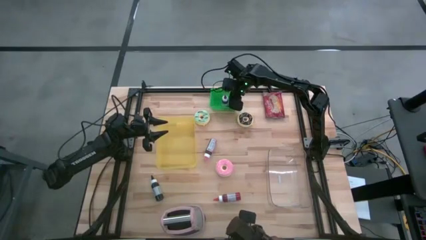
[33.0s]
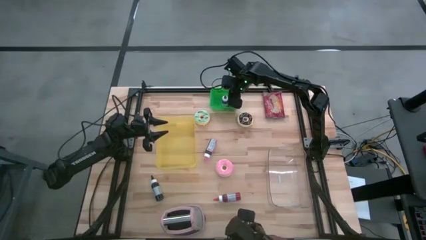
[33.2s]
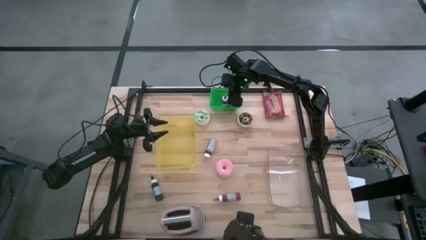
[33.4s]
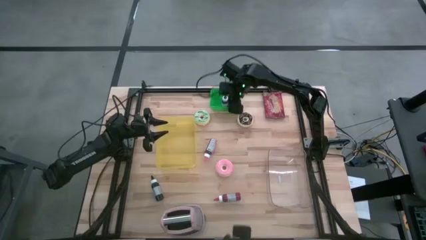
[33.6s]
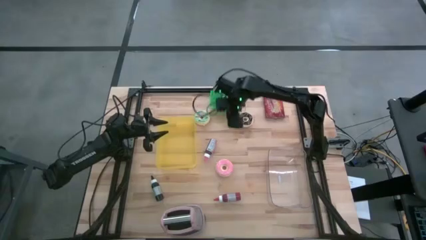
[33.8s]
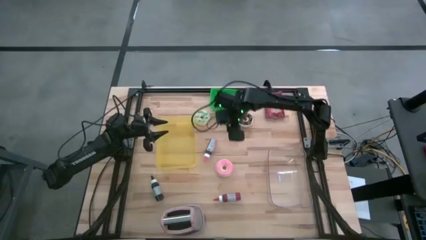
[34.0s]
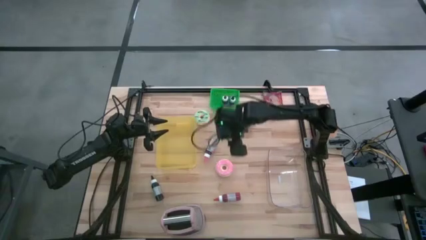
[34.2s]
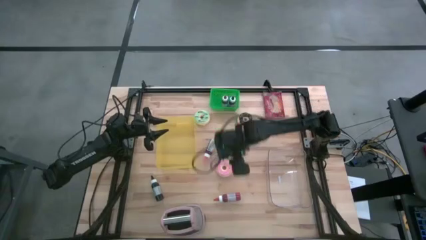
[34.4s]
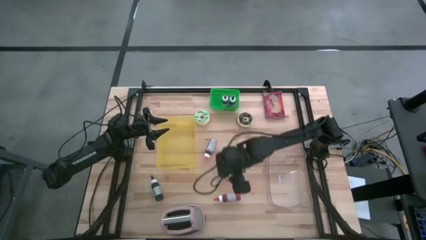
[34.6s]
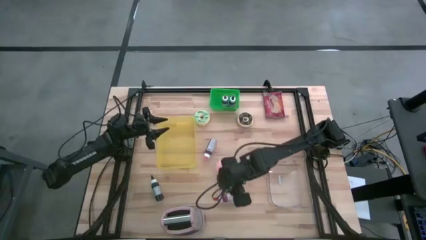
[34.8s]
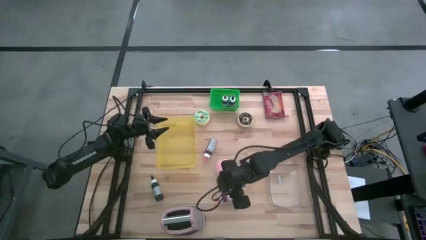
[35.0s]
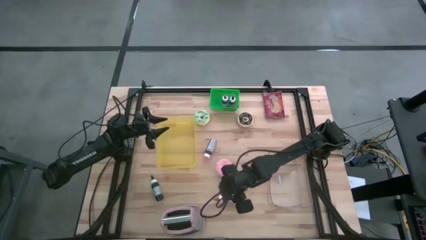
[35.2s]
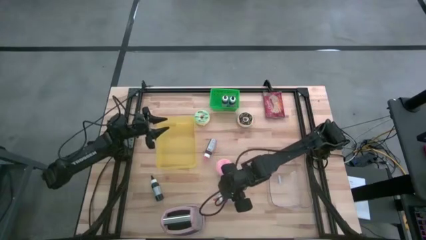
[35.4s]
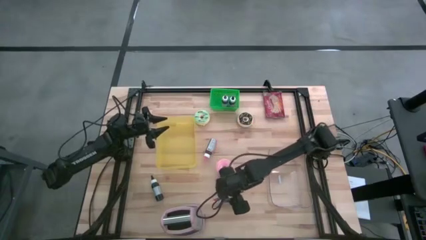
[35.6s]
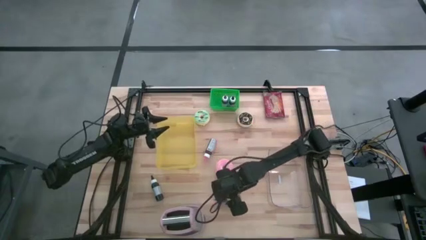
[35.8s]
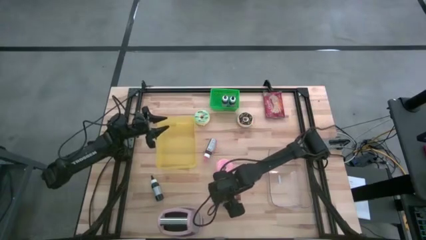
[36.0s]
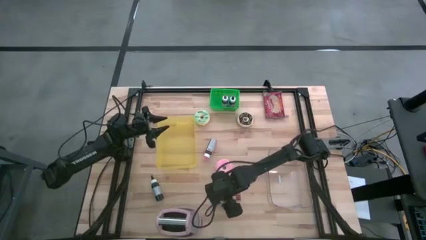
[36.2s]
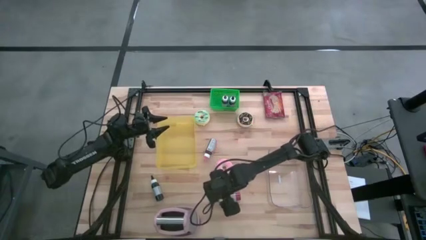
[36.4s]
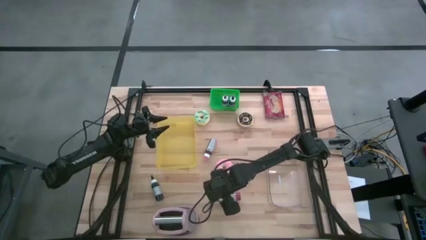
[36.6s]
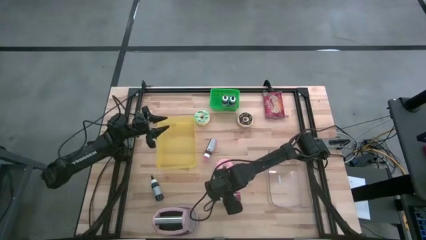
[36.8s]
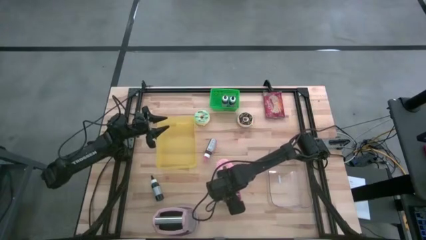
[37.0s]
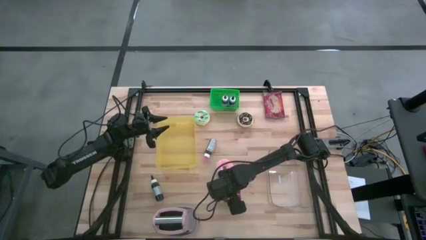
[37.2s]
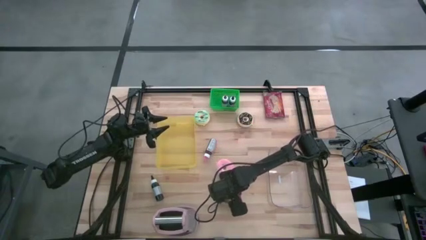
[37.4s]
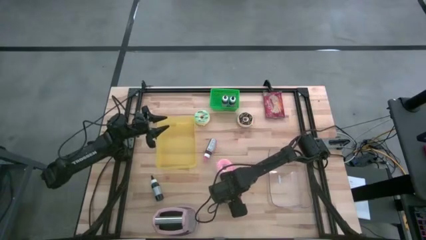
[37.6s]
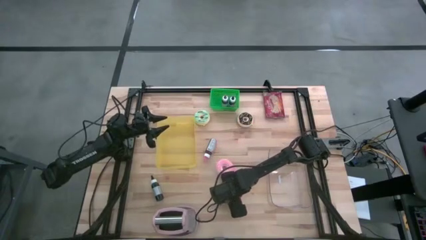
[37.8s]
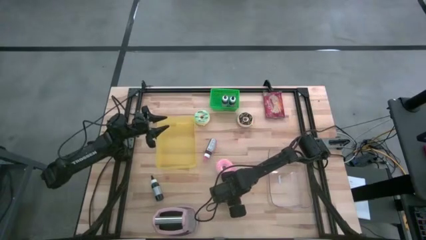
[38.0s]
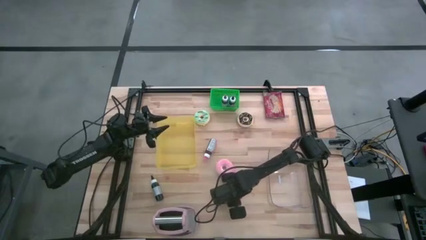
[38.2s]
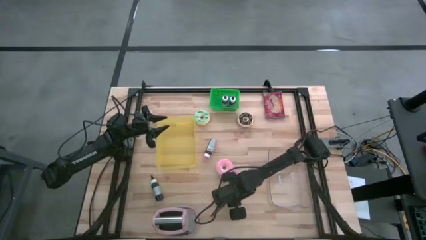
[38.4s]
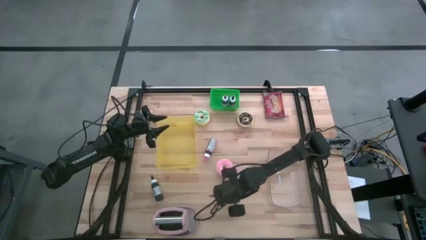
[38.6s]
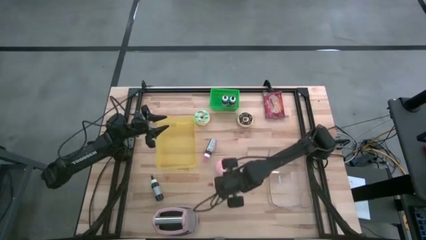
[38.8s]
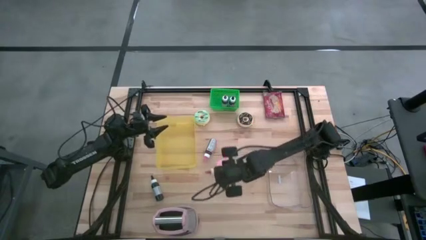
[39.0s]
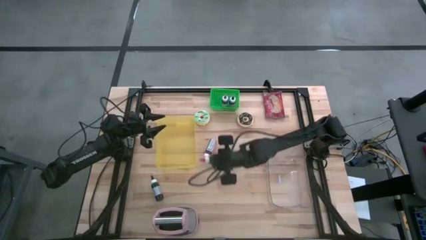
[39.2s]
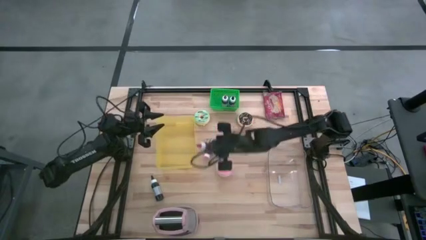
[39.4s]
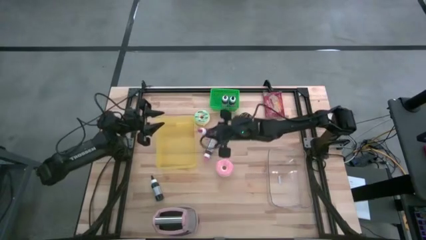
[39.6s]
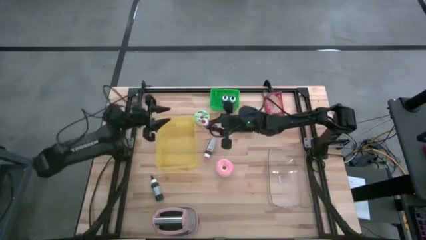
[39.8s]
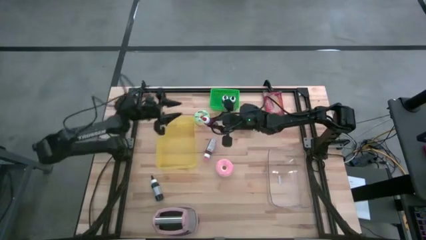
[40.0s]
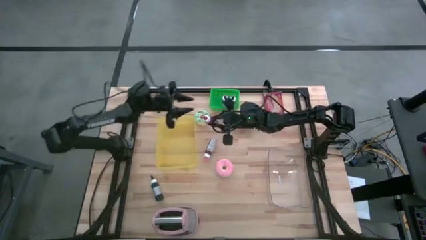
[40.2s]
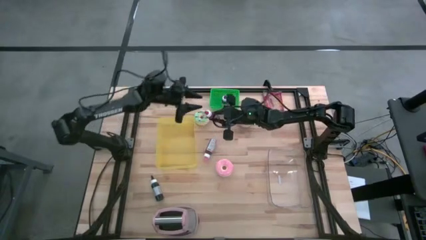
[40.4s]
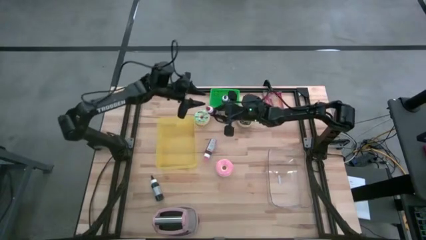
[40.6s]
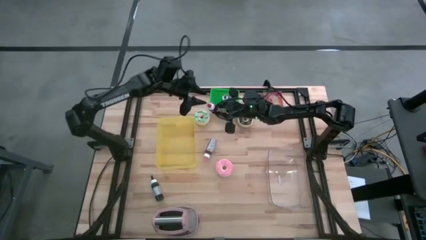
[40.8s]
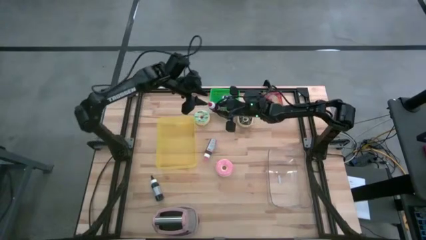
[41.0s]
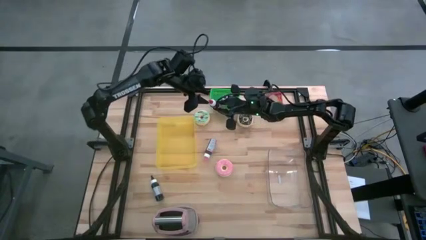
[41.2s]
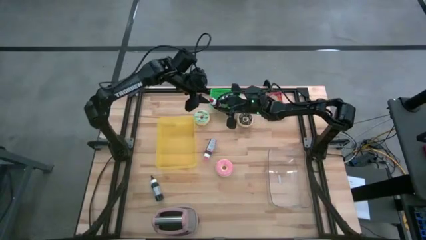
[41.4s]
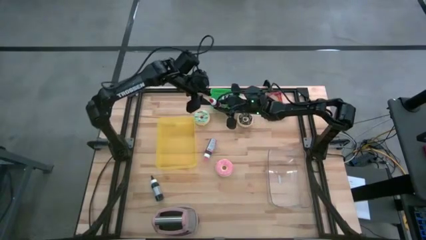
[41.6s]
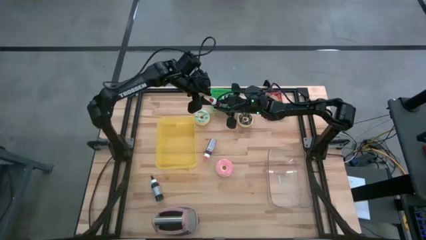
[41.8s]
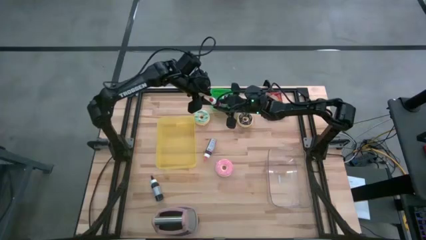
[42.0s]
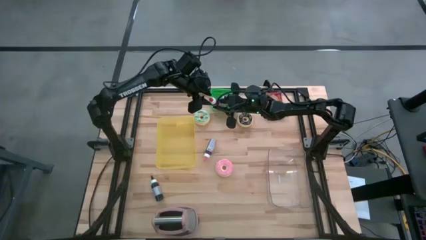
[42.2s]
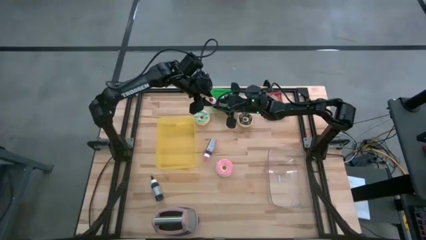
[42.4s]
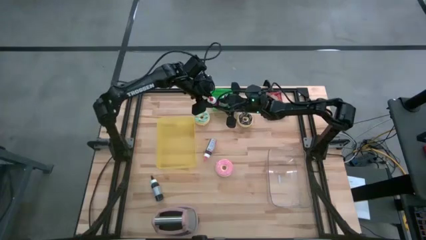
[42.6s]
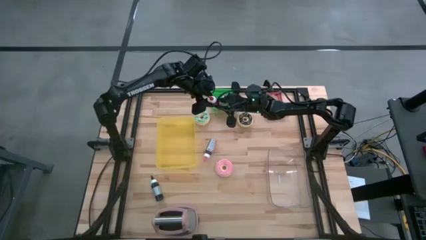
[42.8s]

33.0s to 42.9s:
Task: Pick & Place Food Item
Put the red food coloring bottle into the green bin

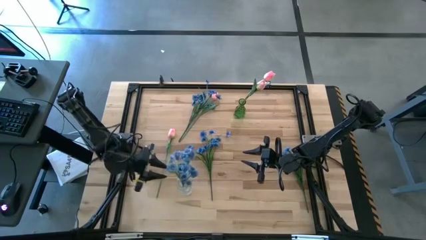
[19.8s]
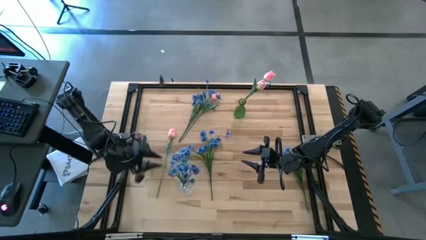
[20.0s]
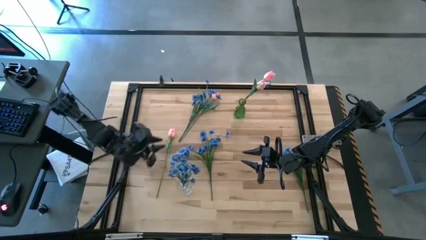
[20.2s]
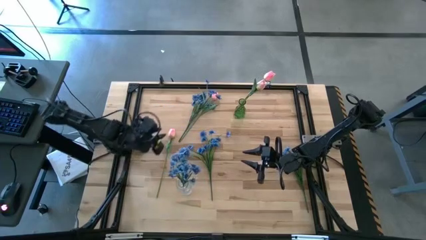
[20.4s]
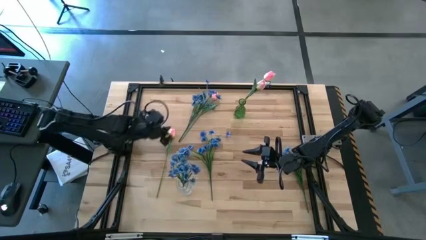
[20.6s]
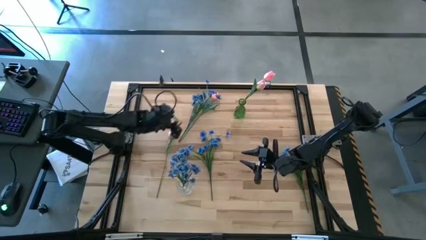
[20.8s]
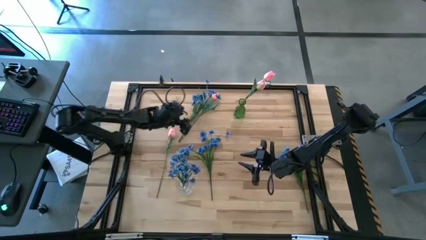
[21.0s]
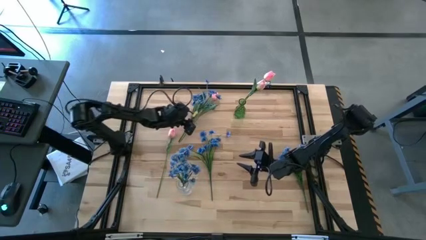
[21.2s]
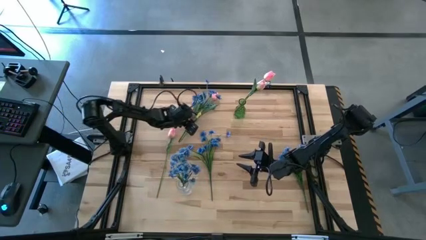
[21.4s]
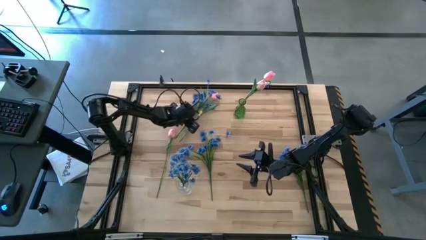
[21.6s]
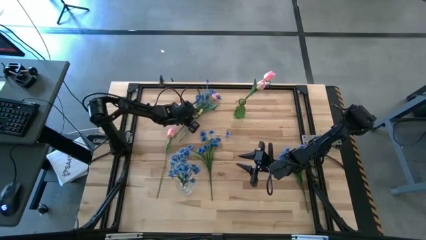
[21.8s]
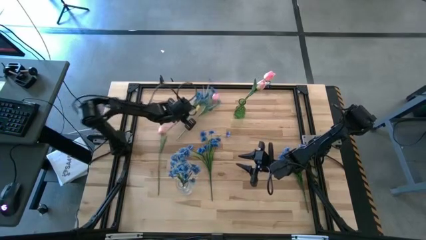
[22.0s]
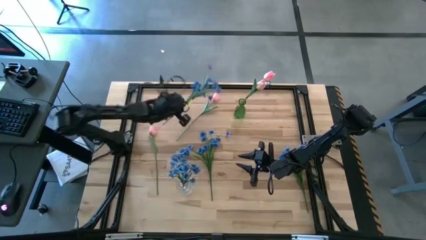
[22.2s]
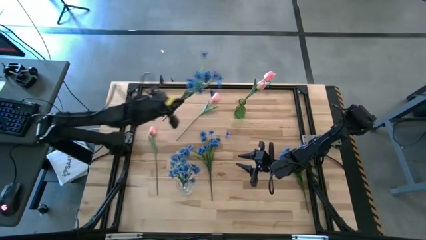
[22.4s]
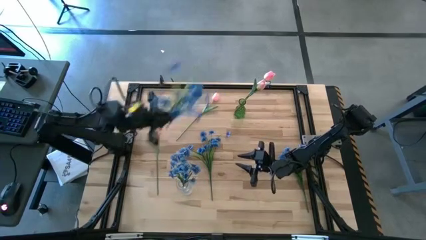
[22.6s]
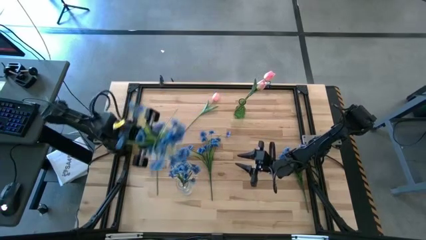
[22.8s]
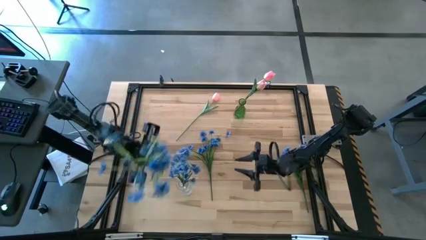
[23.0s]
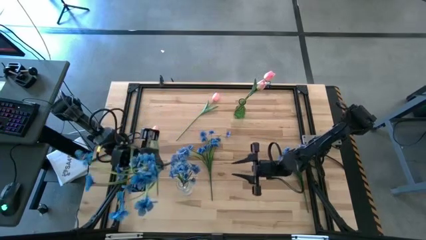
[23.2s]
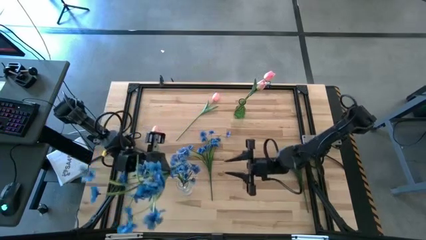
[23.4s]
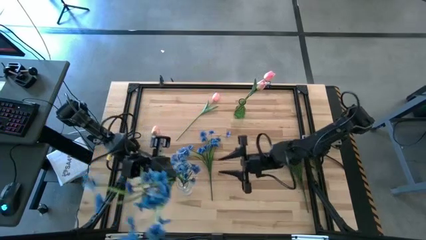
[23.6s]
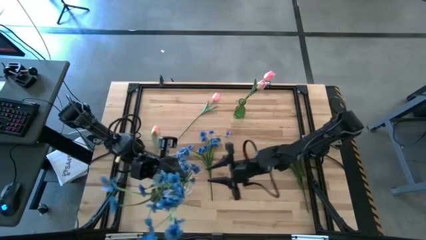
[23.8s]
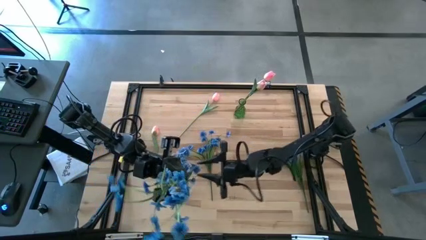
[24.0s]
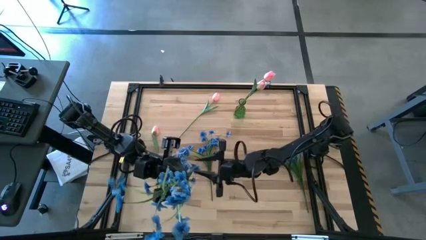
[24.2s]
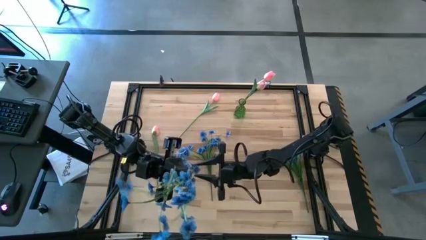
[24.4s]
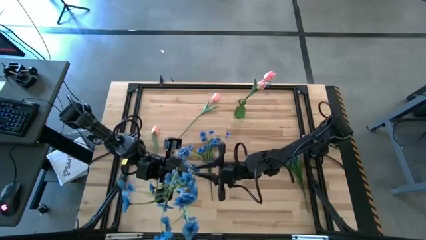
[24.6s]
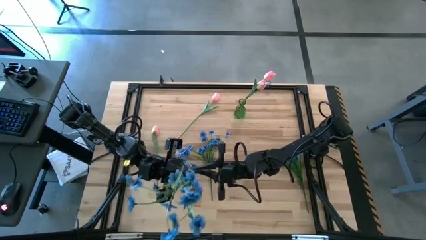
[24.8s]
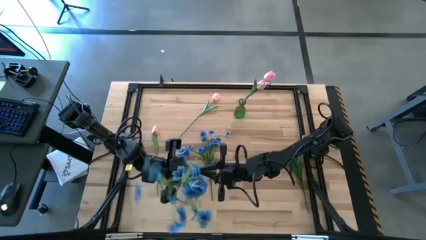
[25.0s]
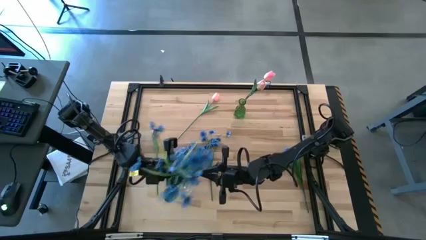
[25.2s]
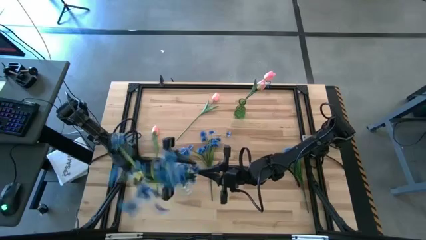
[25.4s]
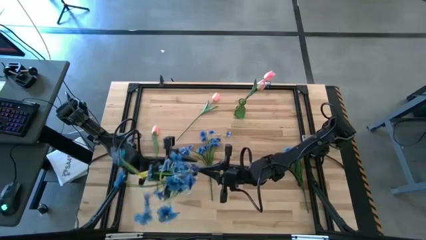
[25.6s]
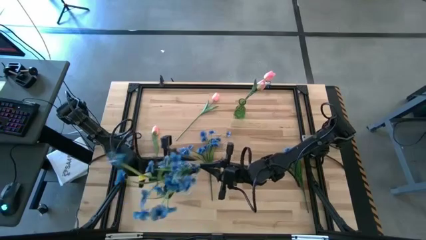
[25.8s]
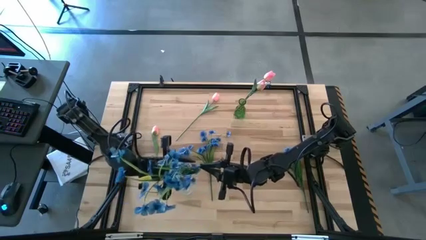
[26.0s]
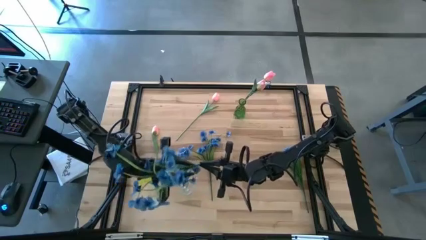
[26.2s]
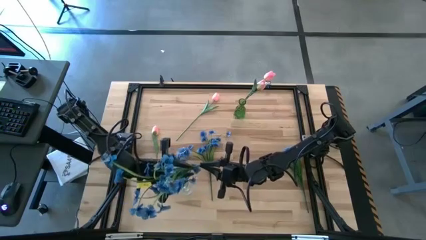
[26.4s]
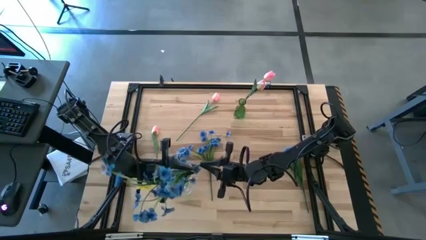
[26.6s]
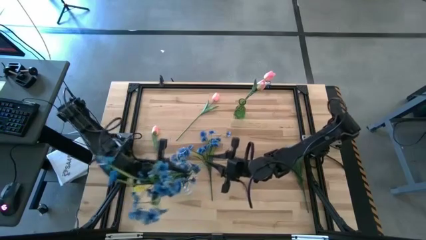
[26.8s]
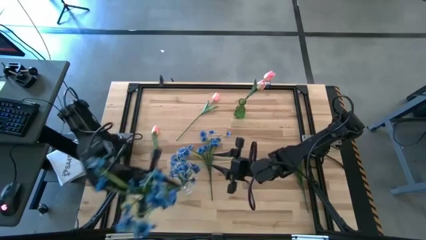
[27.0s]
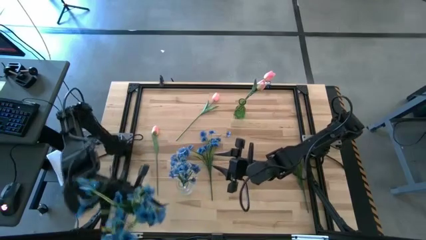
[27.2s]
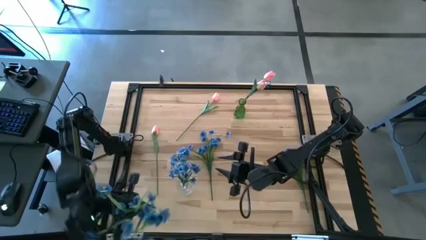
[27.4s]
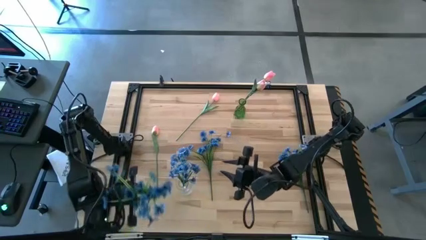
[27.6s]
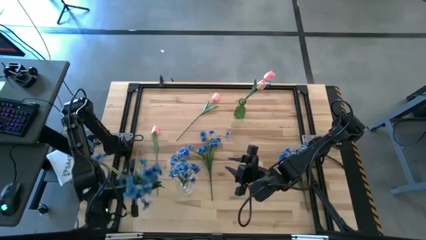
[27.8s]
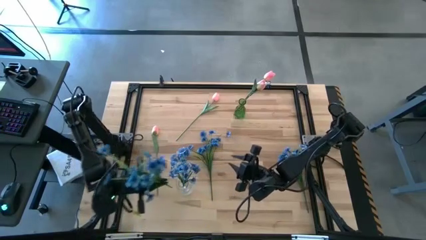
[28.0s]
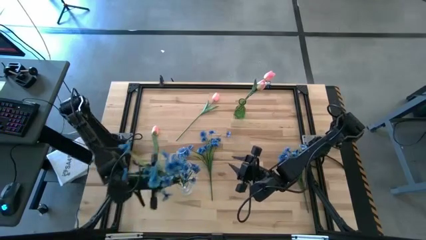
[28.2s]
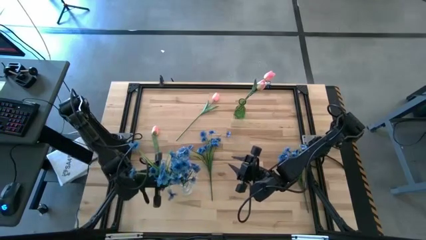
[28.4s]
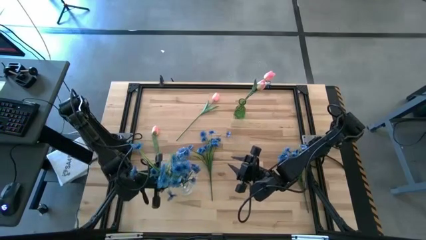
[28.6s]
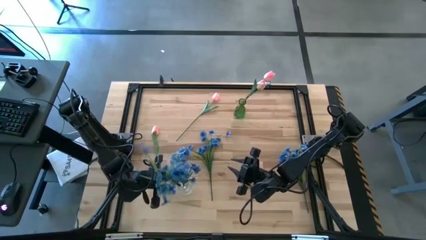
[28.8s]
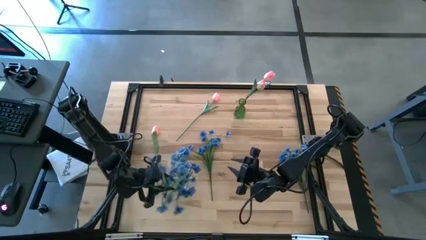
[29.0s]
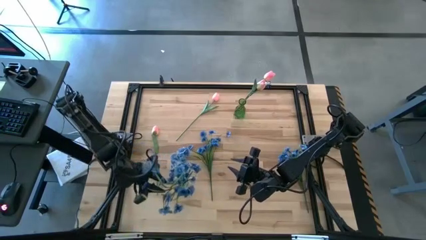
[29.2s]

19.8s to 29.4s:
Task: Sort flowers into vase by color
Put the blue flowers into the transparent vase
